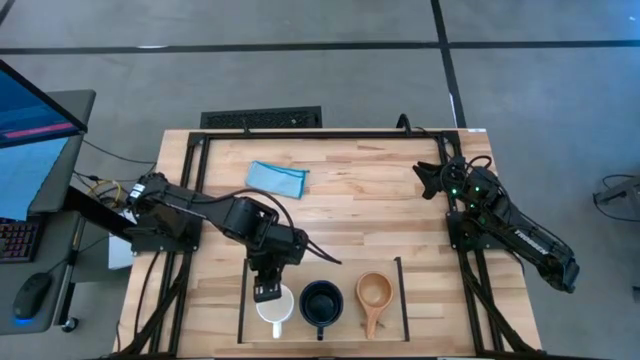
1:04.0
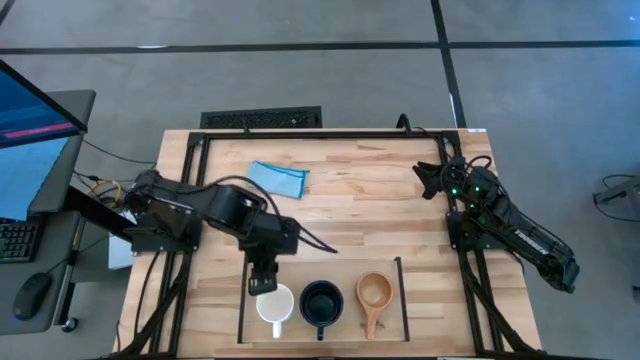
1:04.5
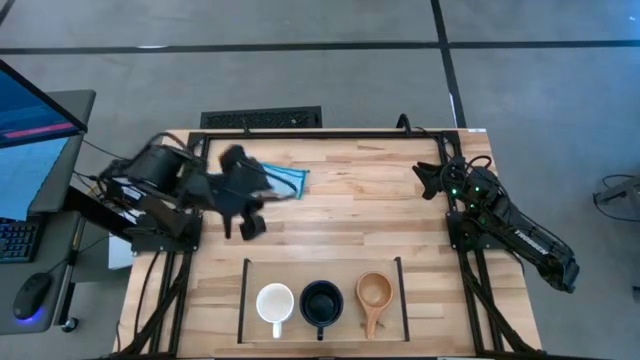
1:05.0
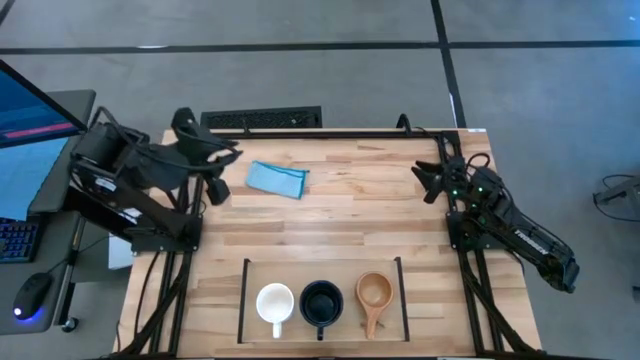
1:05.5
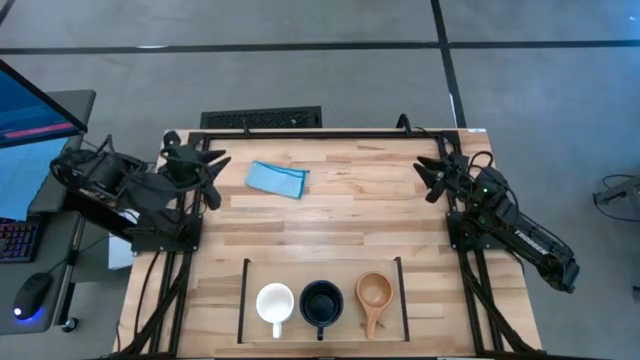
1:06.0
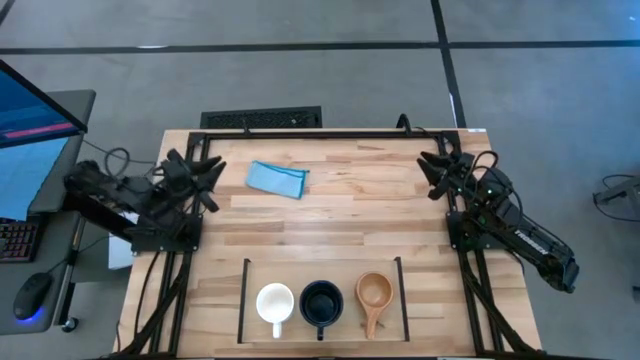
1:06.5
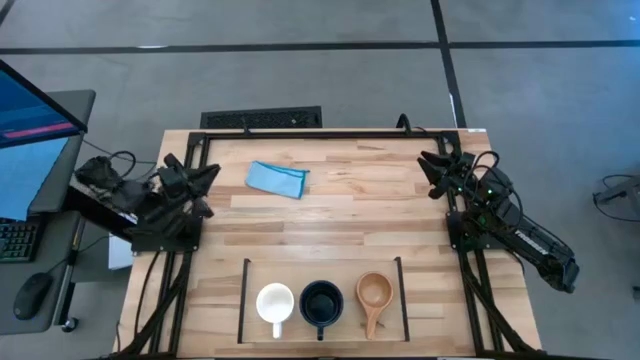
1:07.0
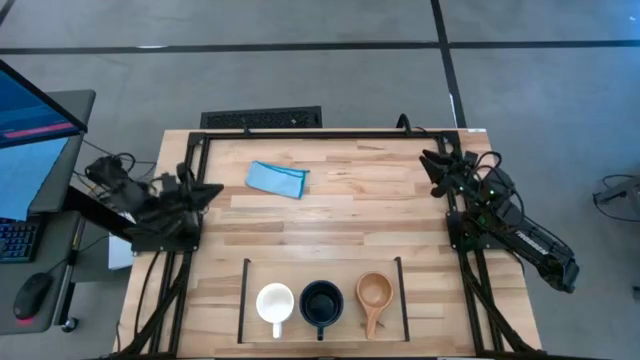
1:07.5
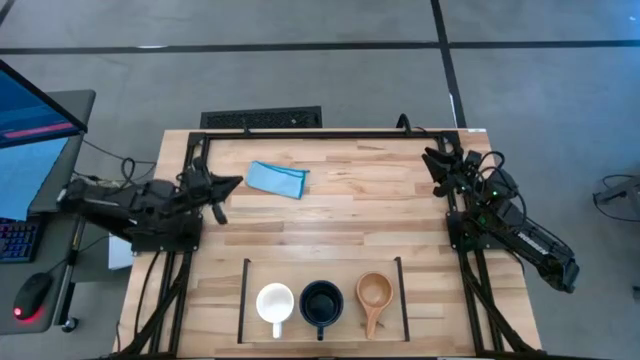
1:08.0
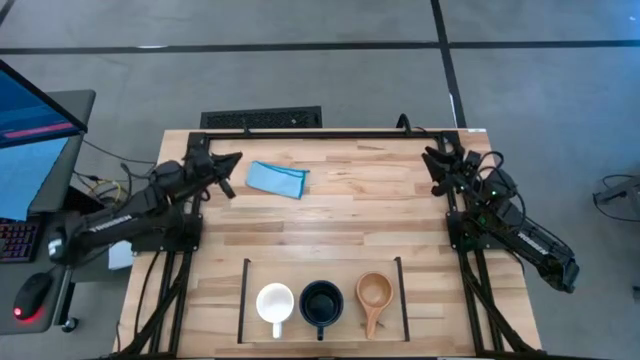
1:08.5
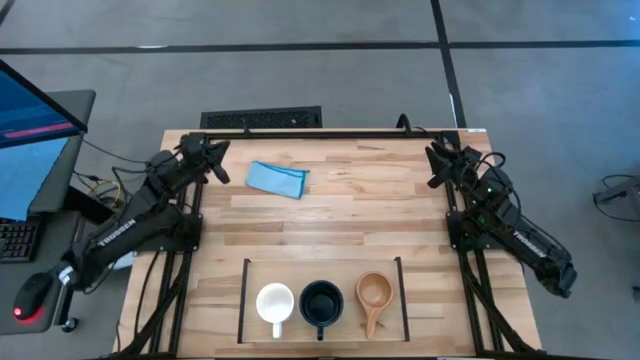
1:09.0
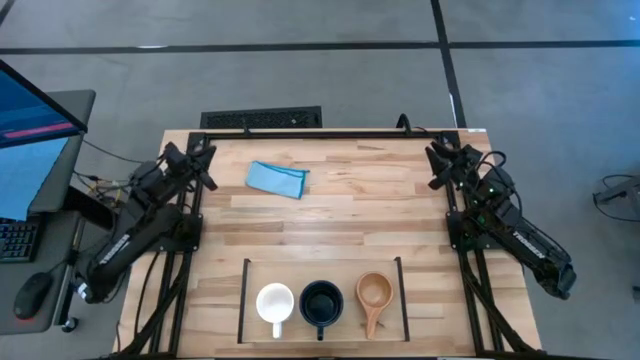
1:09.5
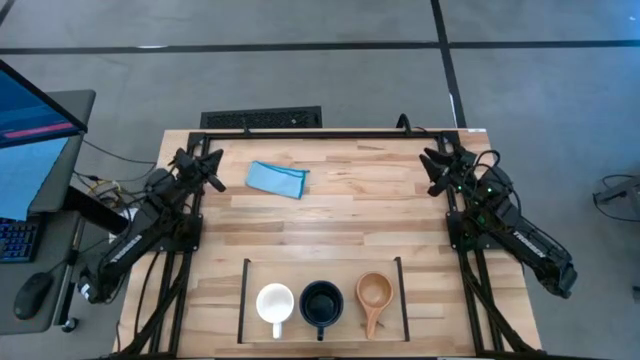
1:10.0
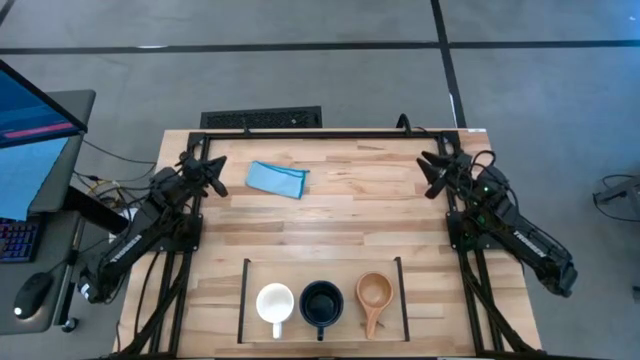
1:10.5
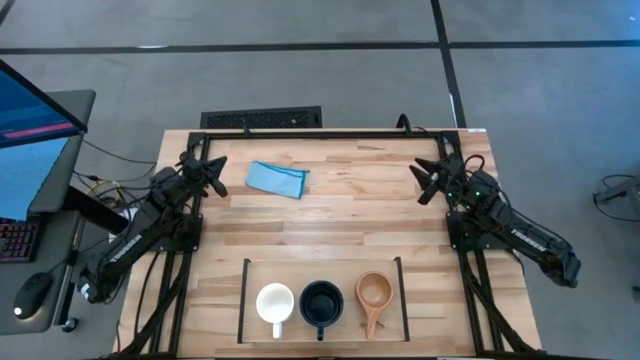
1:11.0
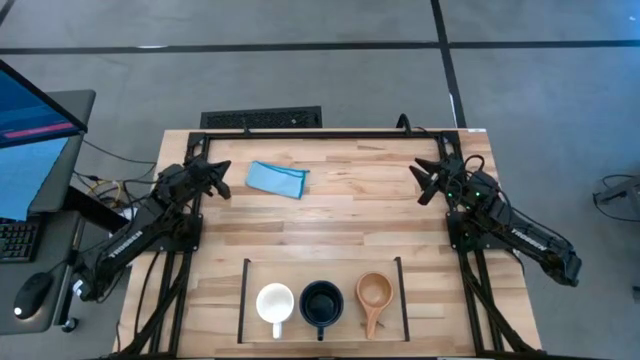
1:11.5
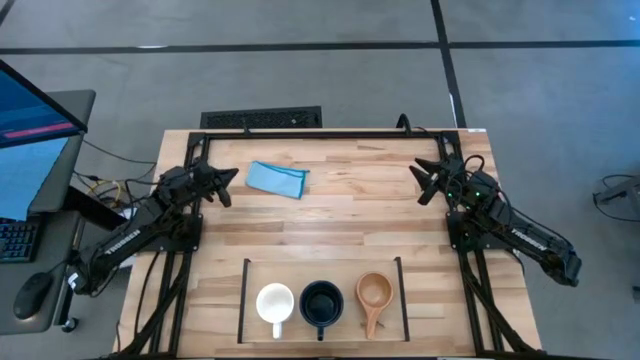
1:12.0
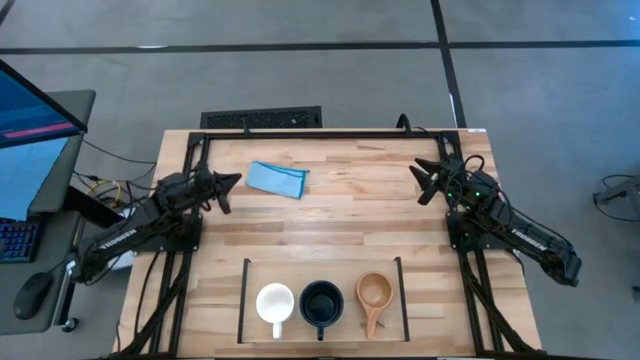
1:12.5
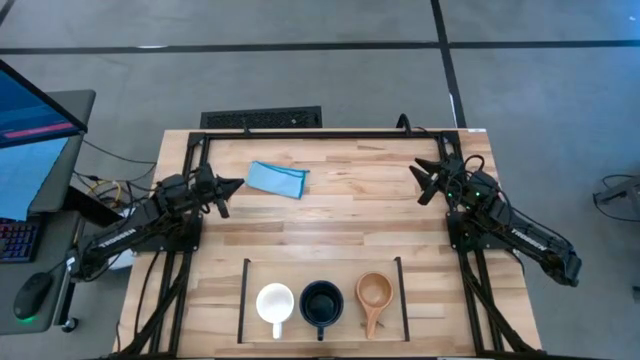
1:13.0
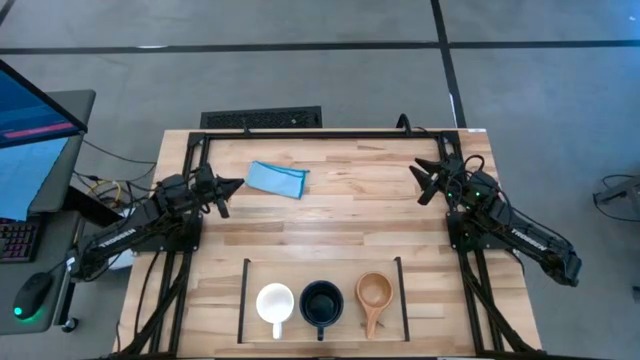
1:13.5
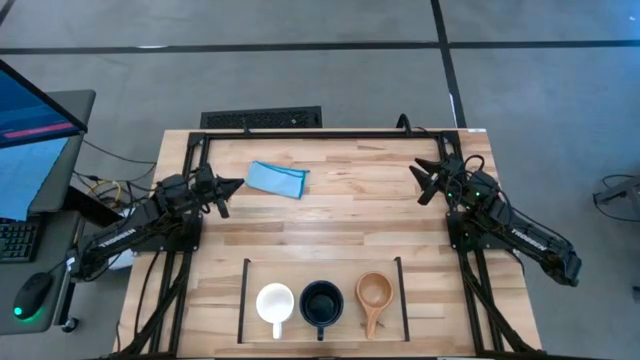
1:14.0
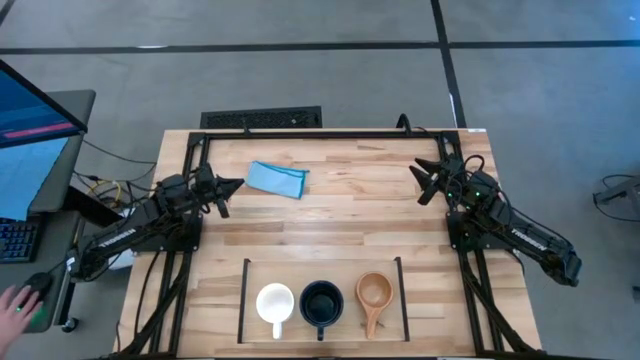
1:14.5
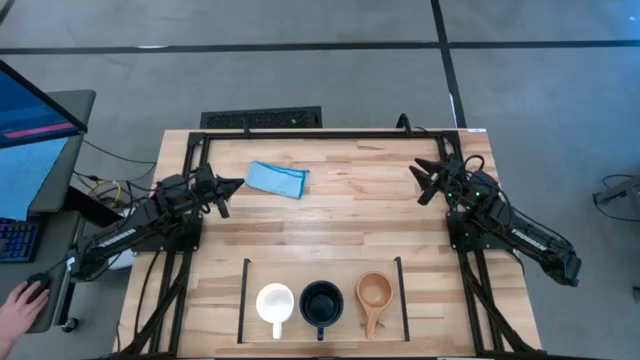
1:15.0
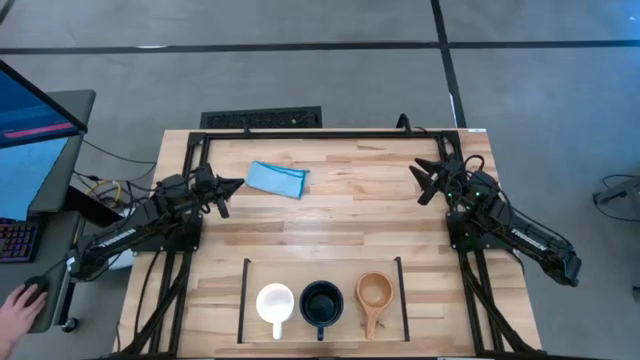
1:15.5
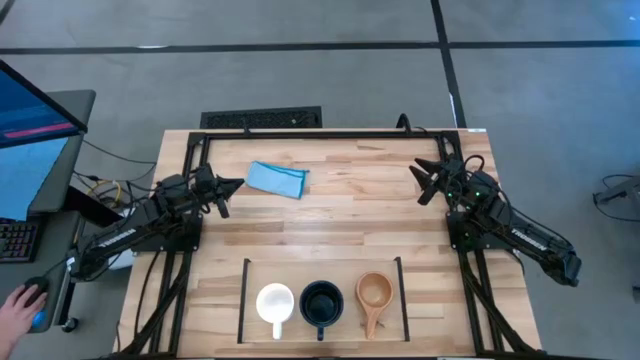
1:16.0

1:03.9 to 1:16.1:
Task: Stack small to large cups/mugs on shelf
Return to Home Position

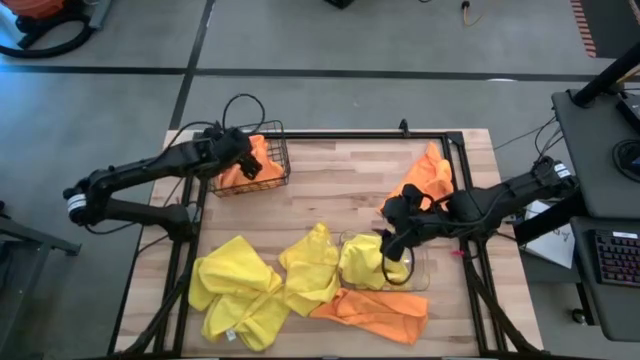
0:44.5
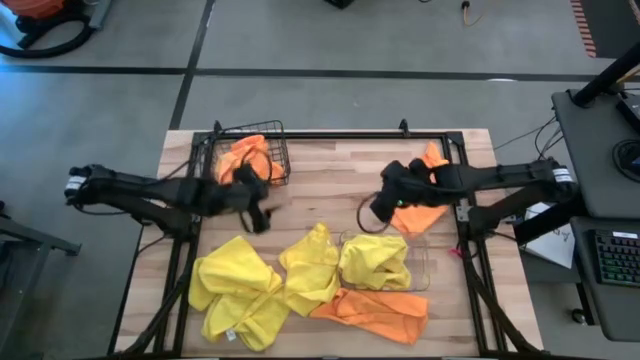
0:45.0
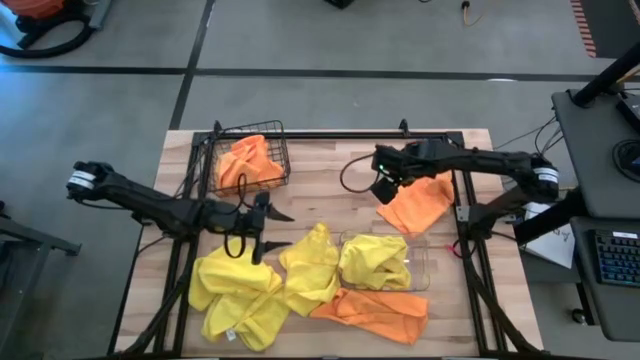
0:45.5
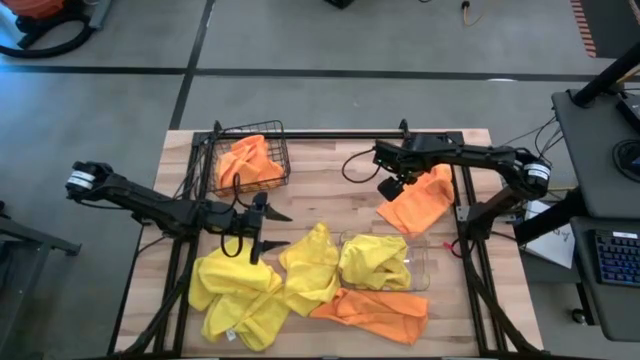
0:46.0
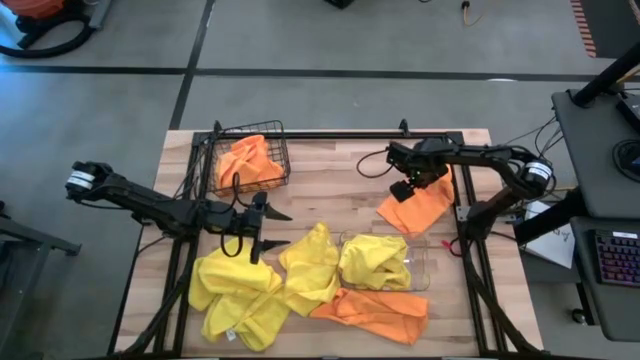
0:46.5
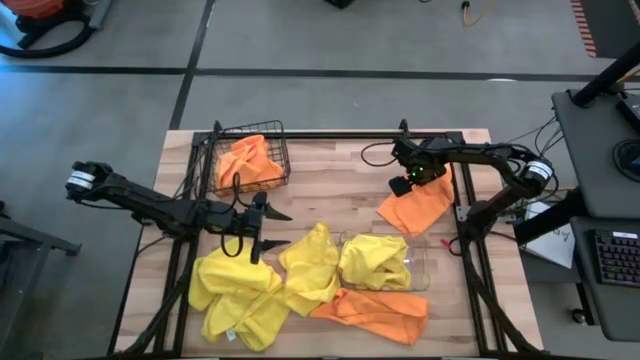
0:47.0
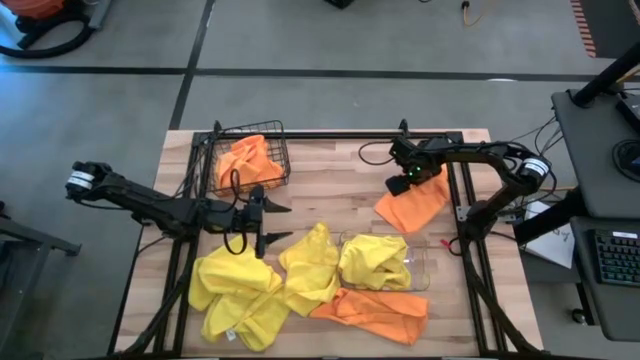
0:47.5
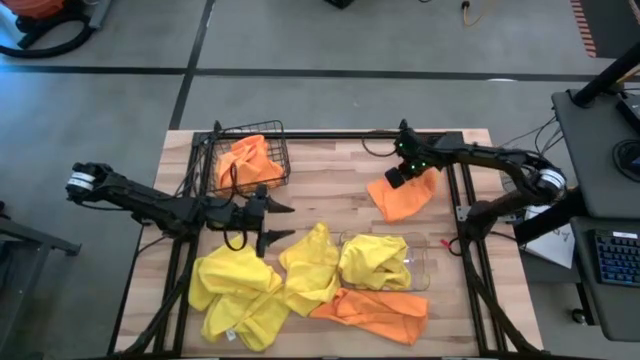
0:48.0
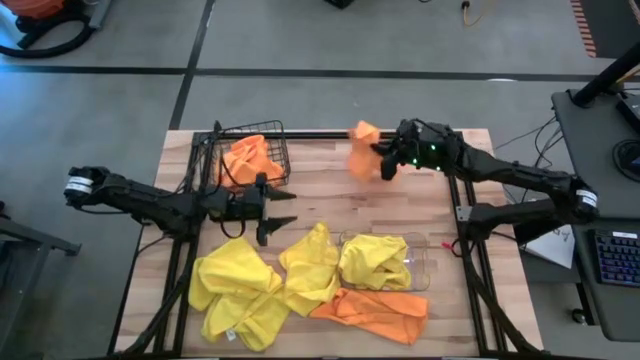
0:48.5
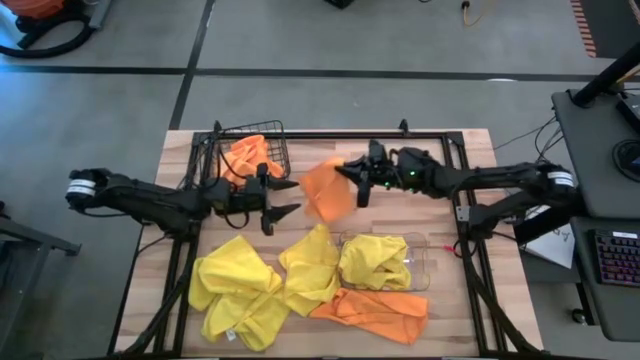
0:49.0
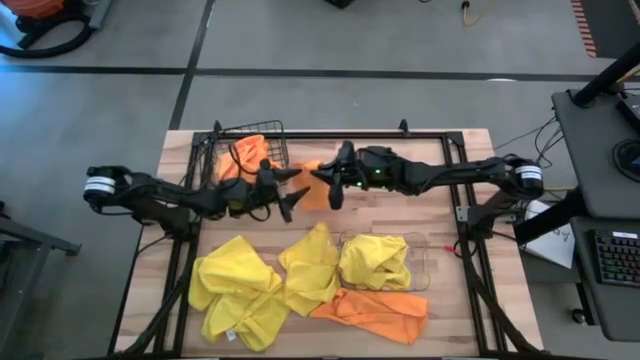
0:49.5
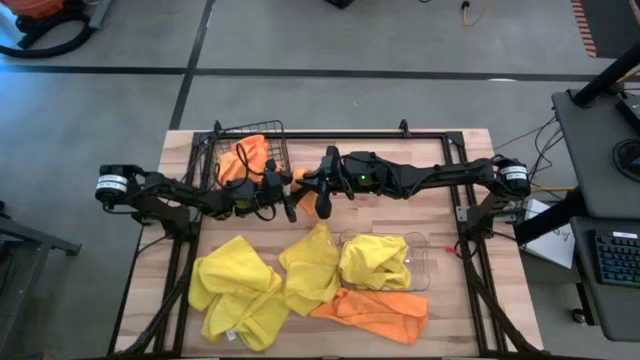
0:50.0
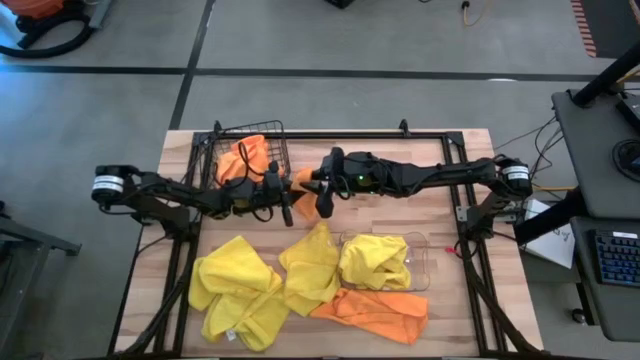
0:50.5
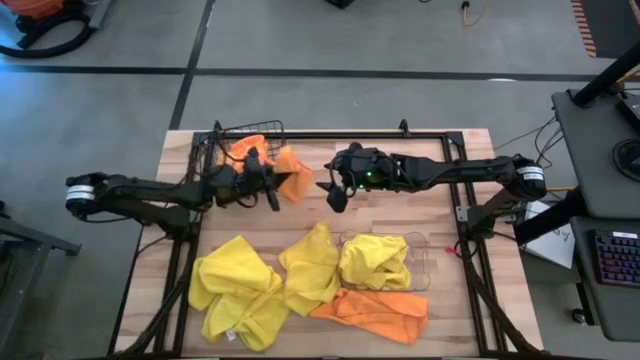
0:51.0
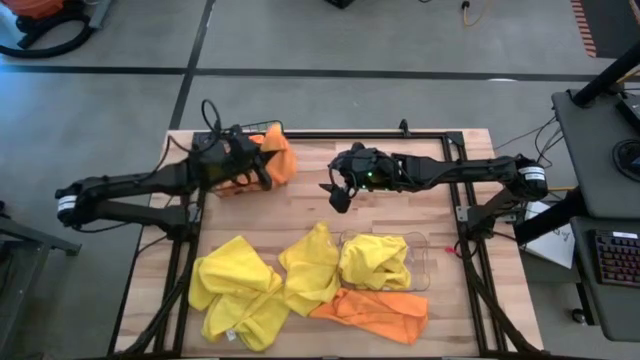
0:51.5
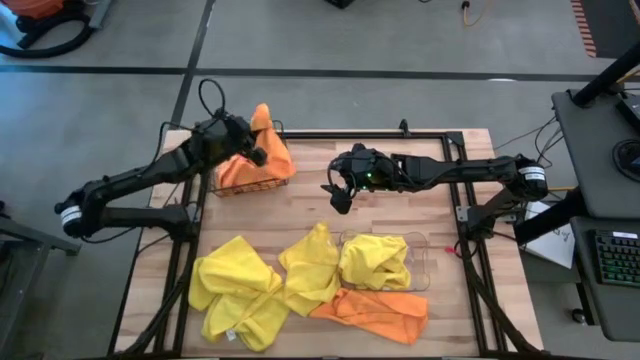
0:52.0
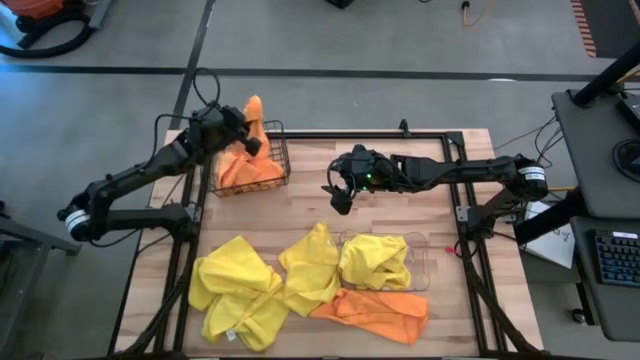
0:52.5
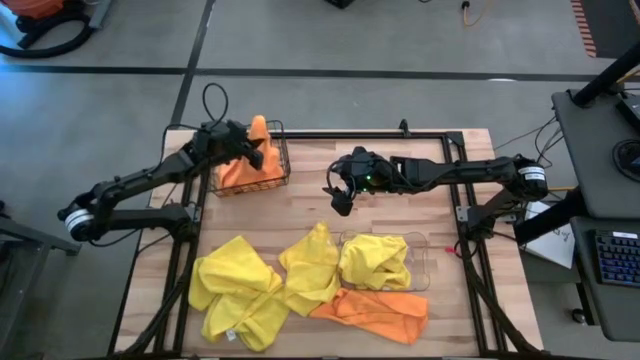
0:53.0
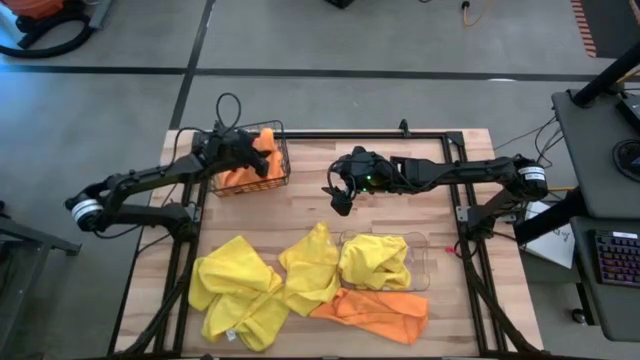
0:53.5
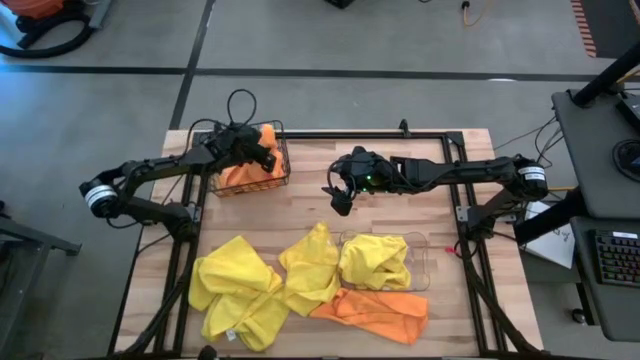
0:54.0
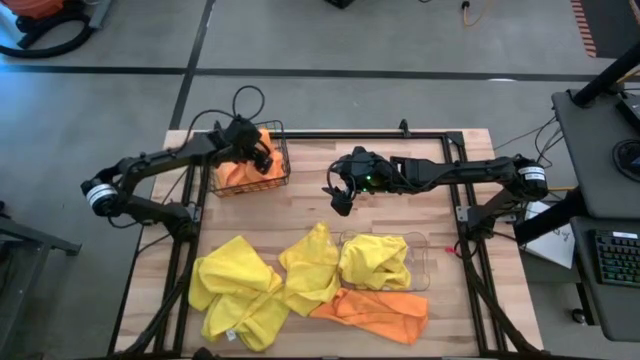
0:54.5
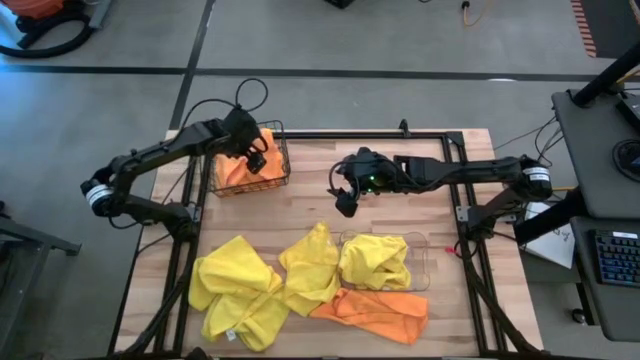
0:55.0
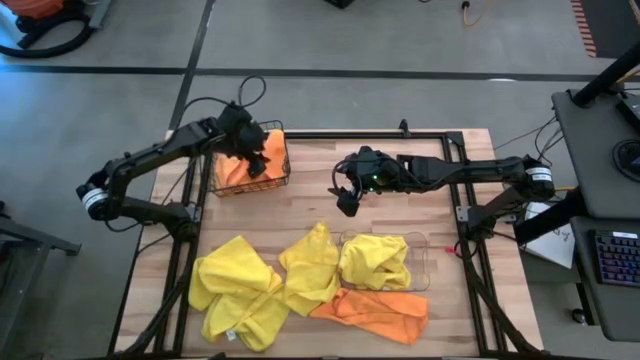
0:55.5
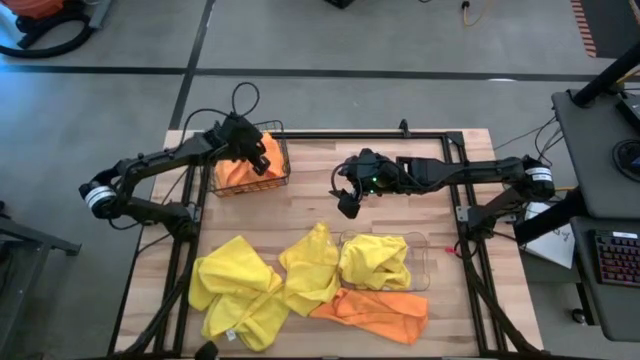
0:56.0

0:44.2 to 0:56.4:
Task: Sort microfiber towel by color & place in baskets
Put the towel into the black basket
